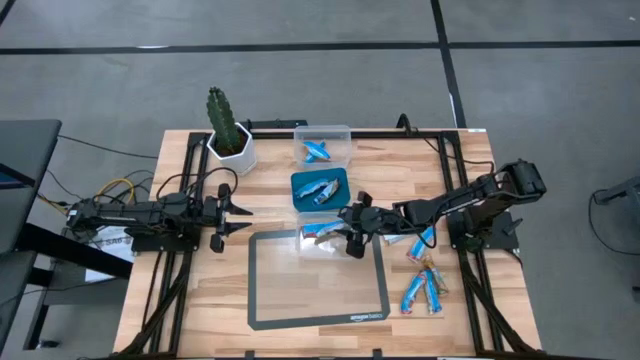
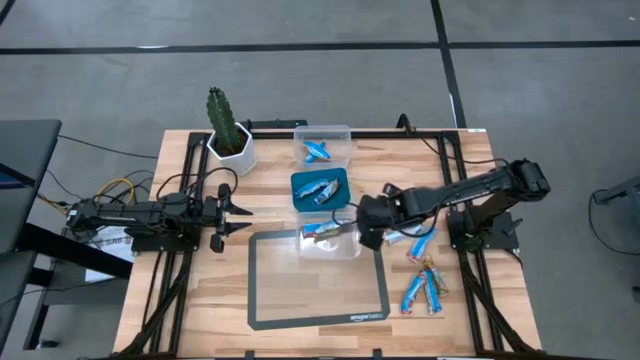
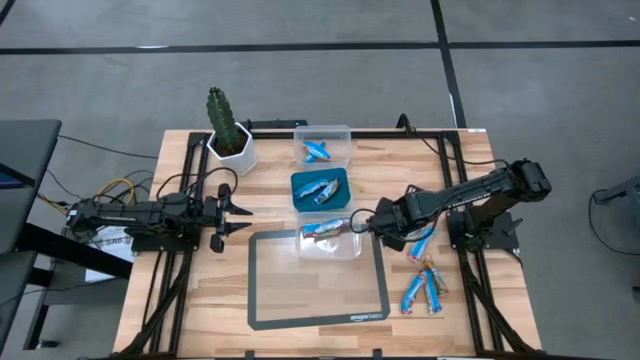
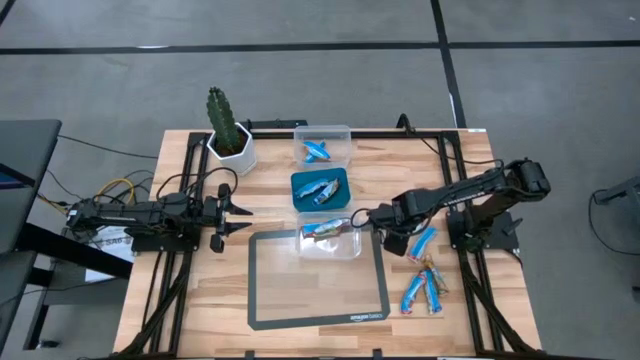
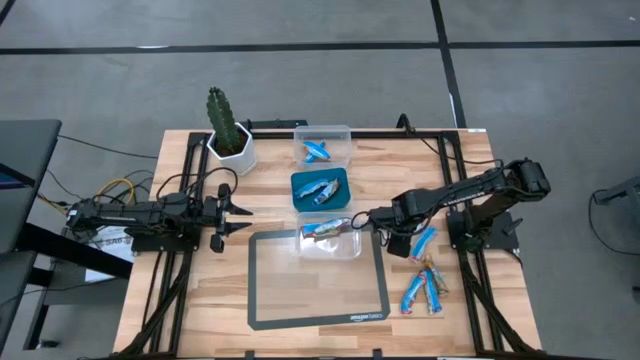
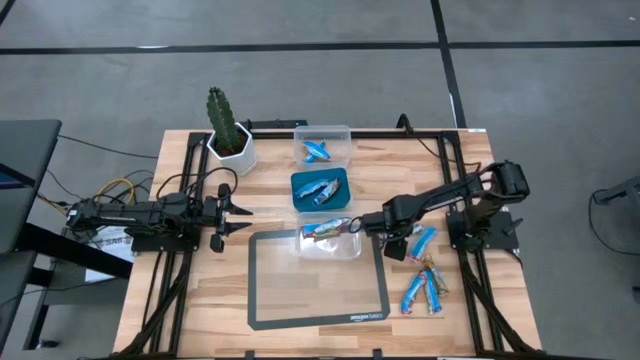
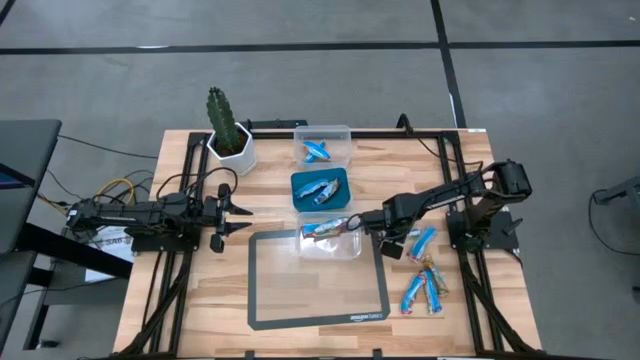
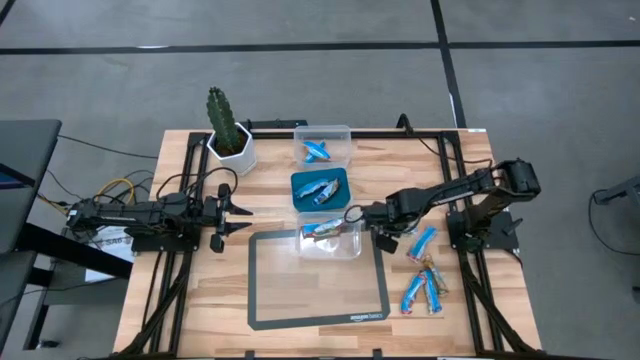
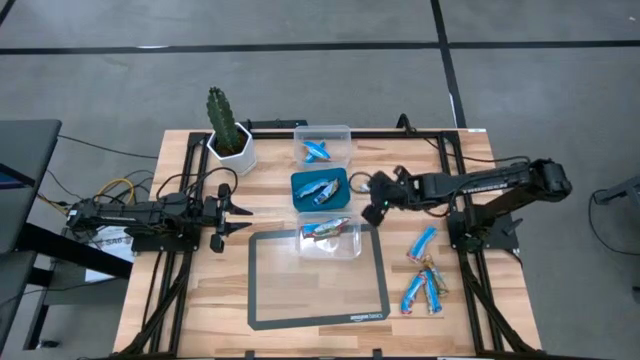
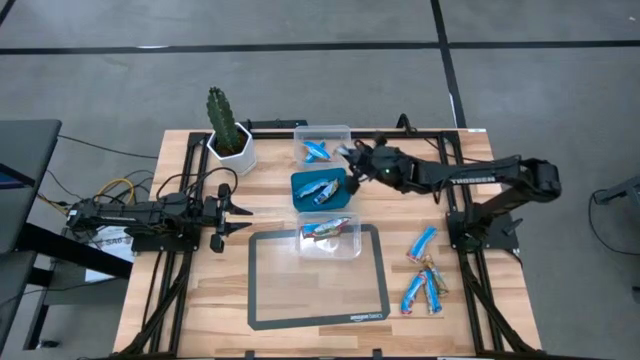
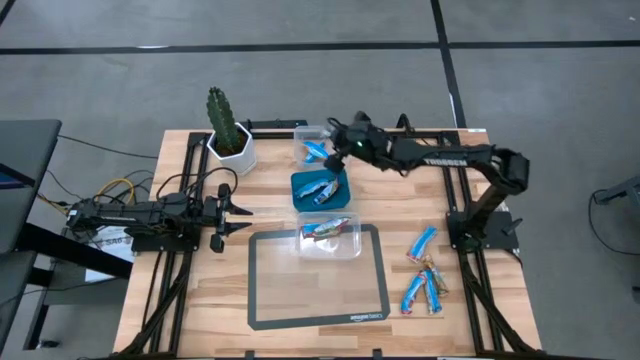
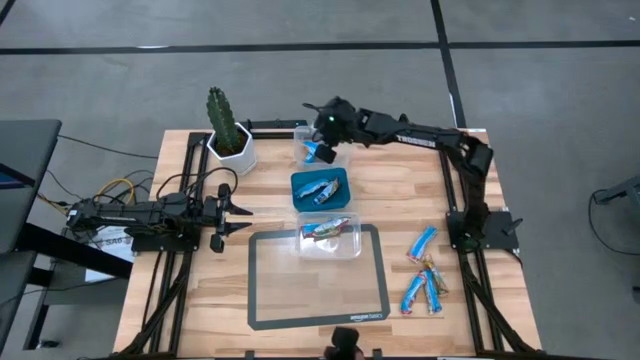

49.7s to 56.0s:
Task: Pick and place Granola Bars by type
Put the top orange granola bar into the top transparent bin

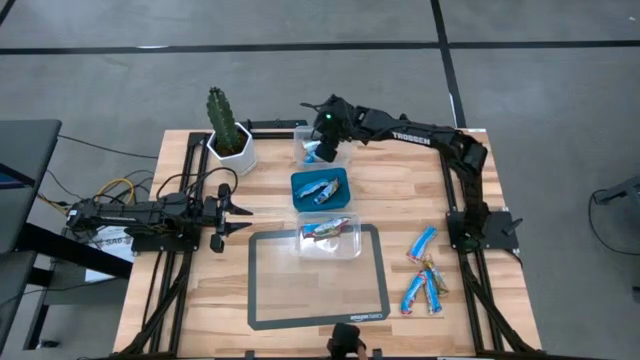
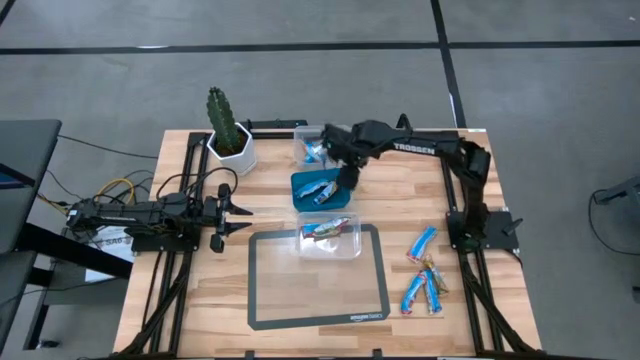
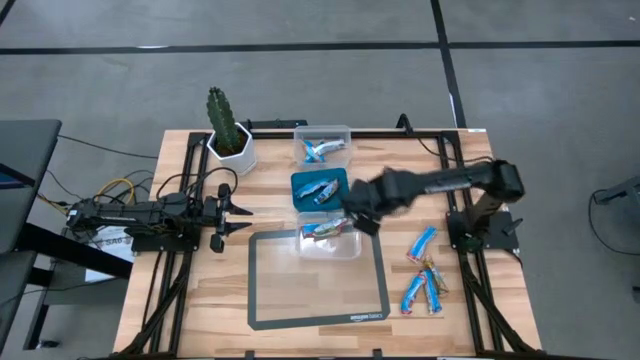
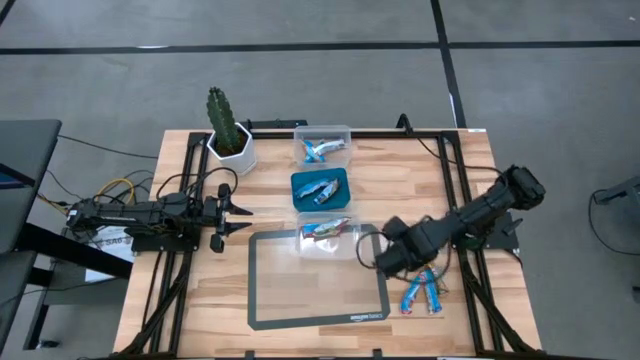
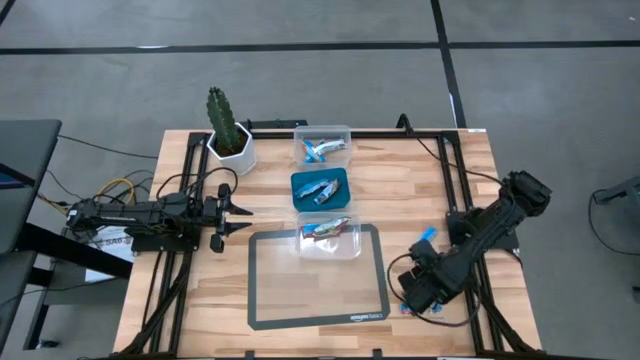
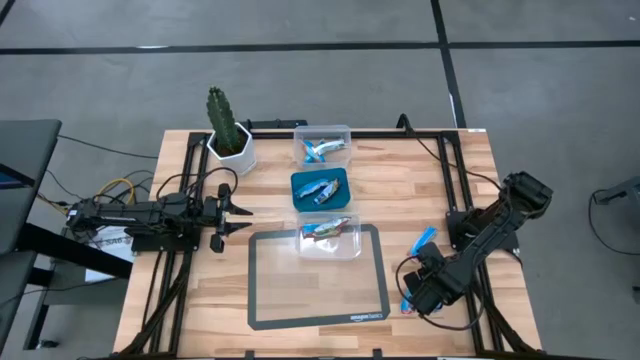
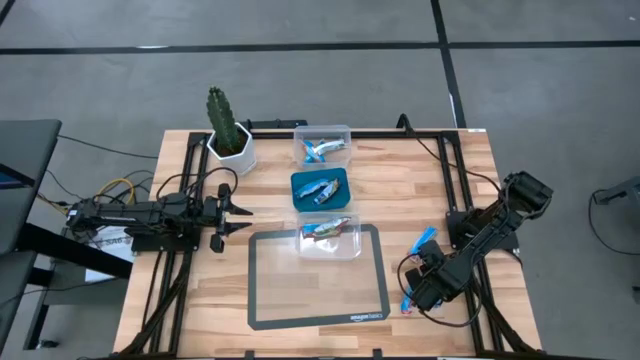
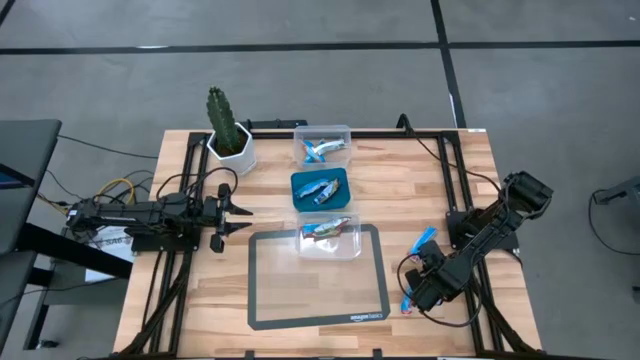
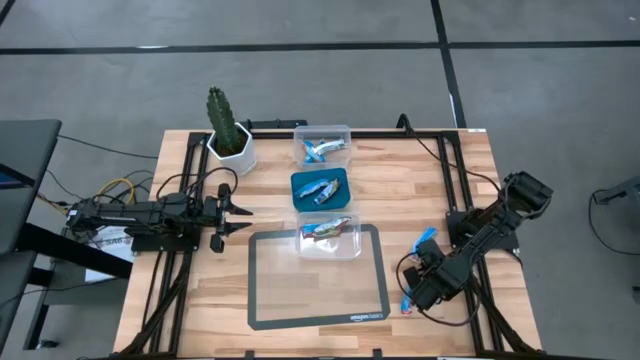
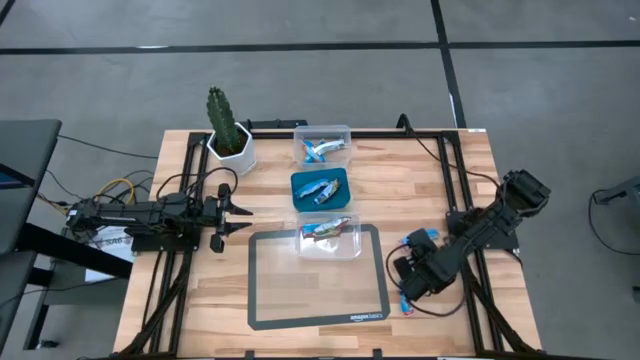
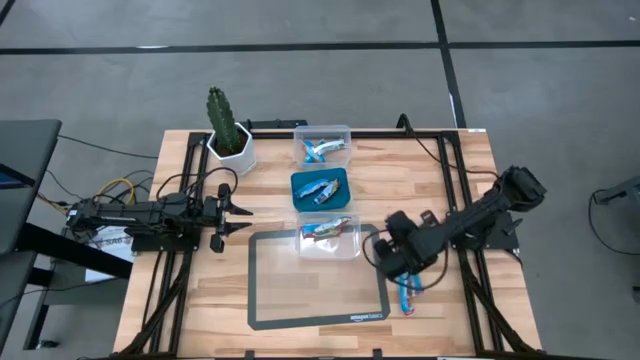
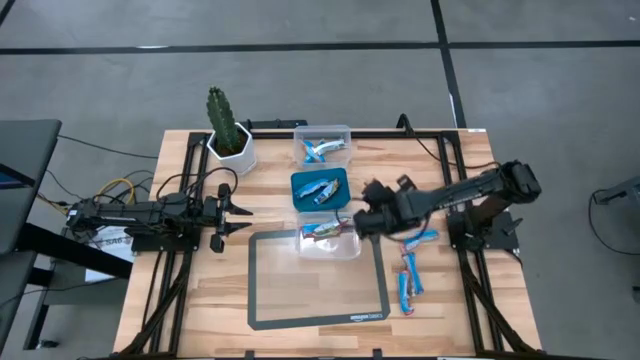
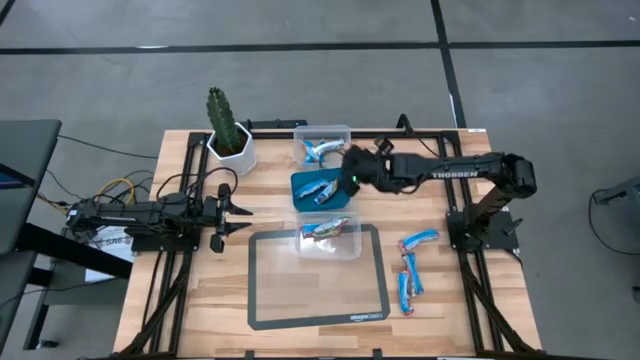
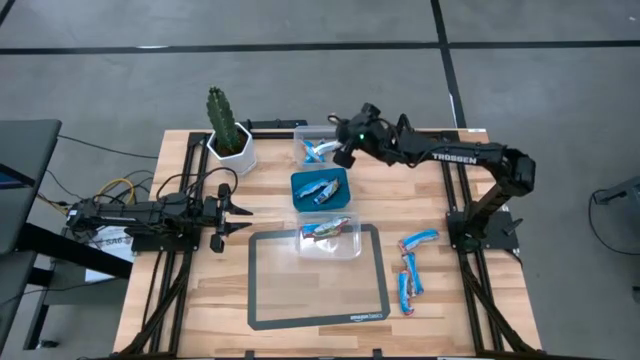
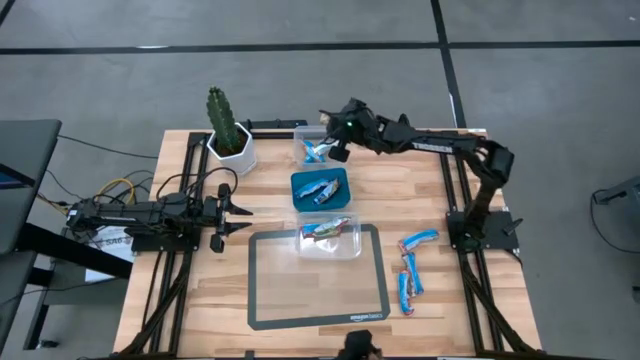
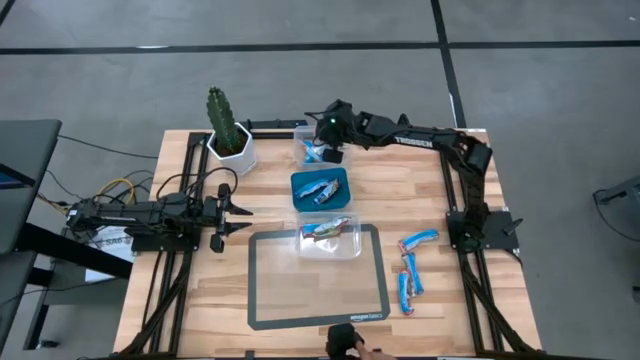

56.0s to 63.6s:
Put the orange granola bar into the top transparent bin

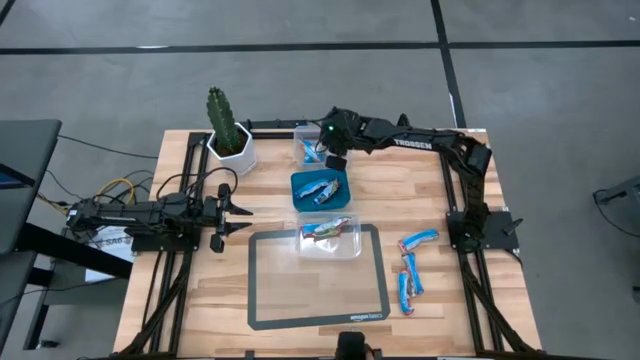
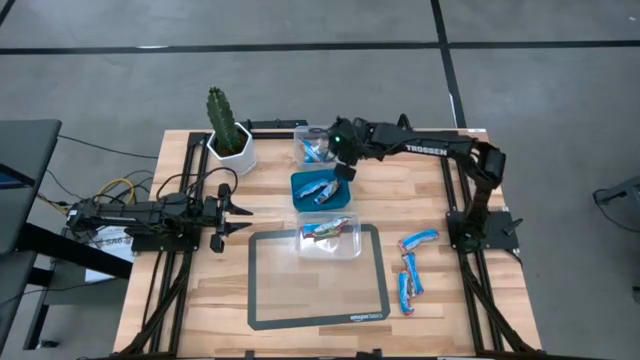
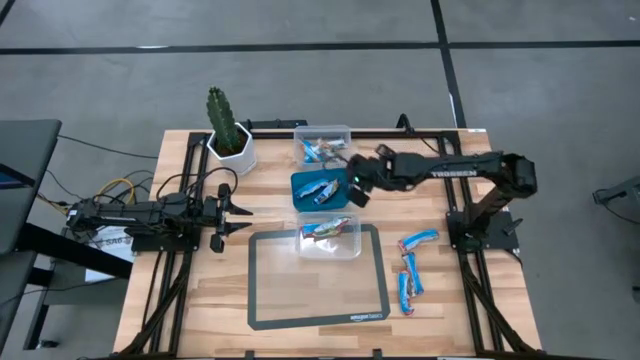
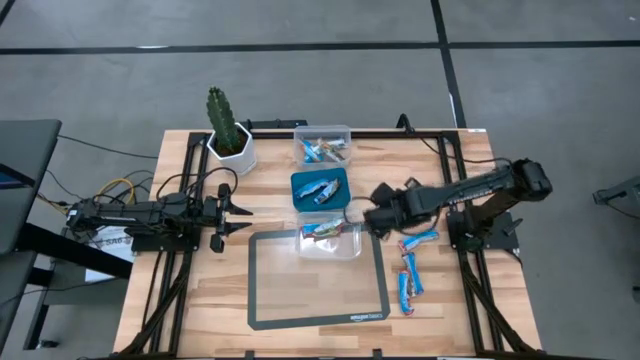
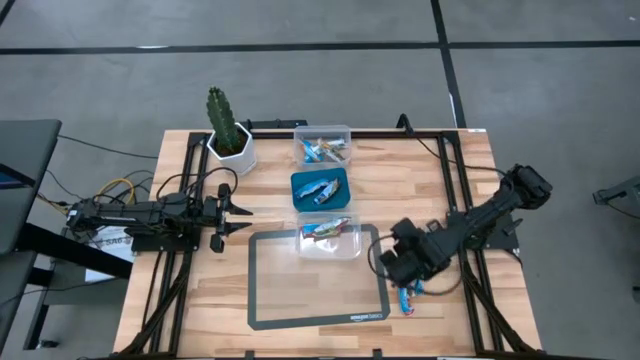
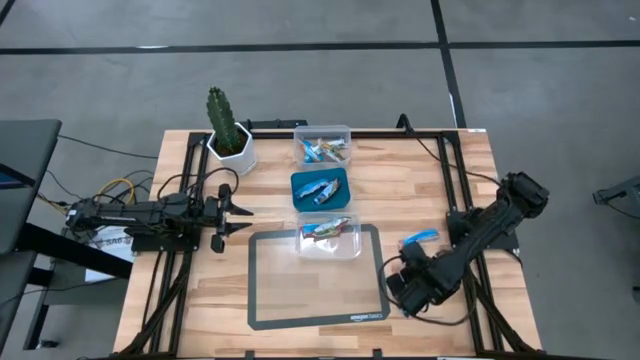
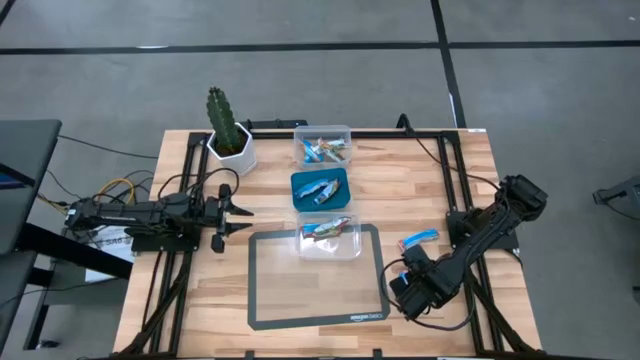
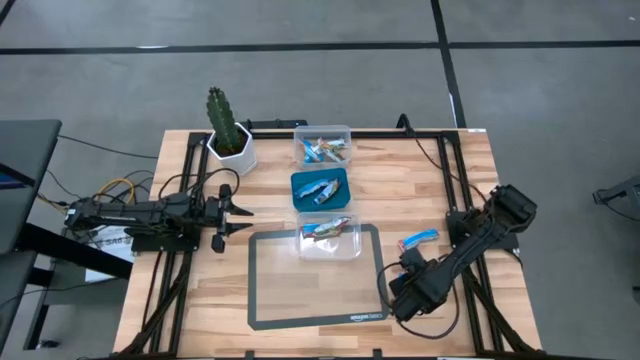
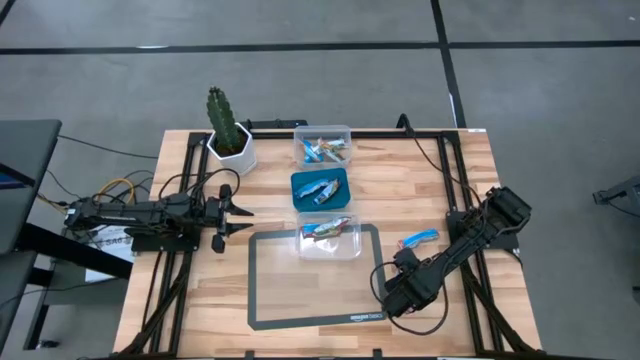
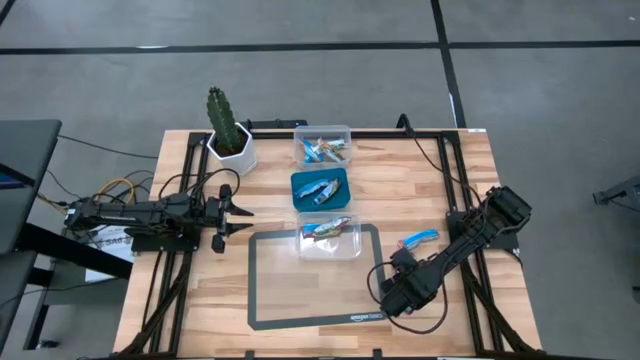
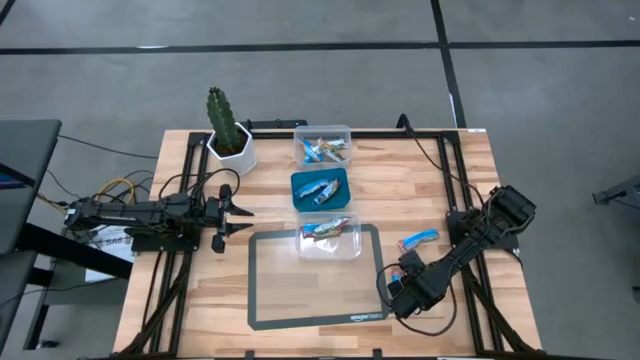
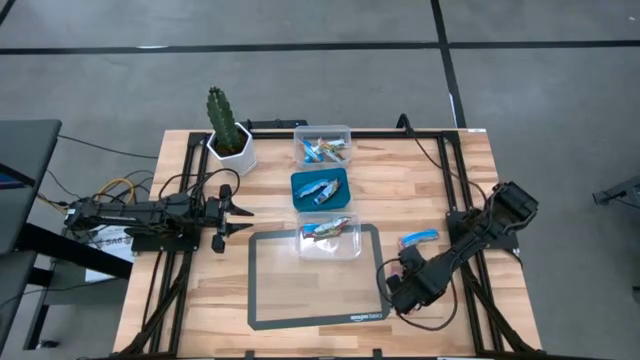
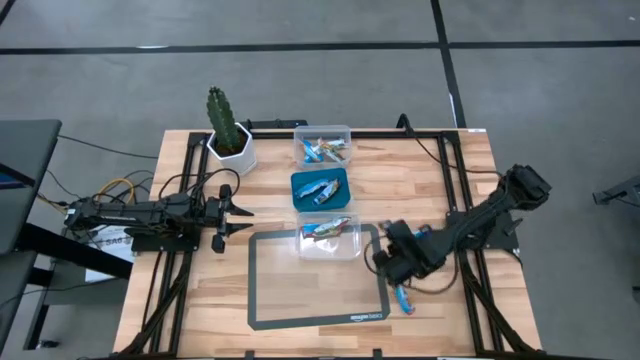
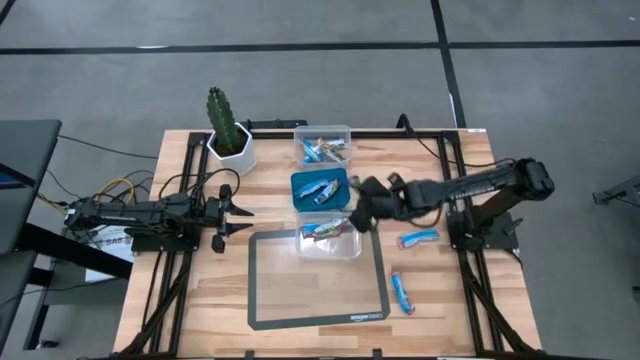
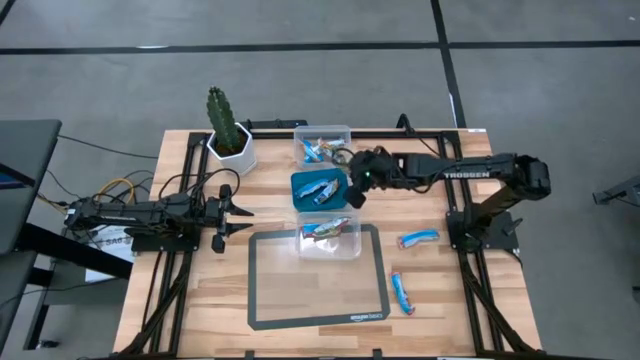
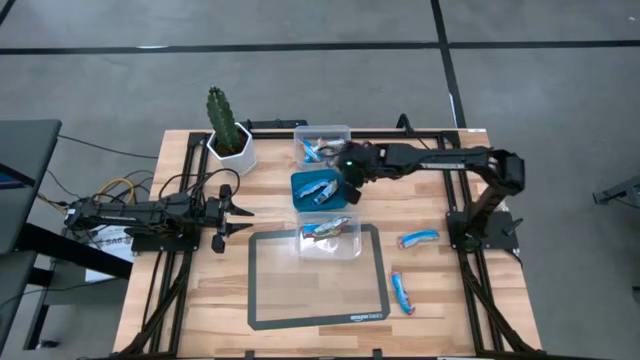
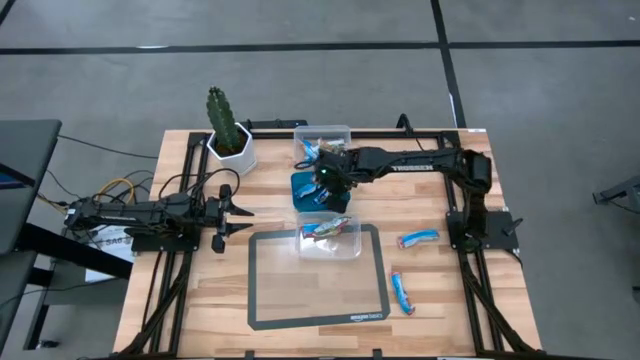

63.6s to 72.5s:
Put the blue granola bar into the blue bin
